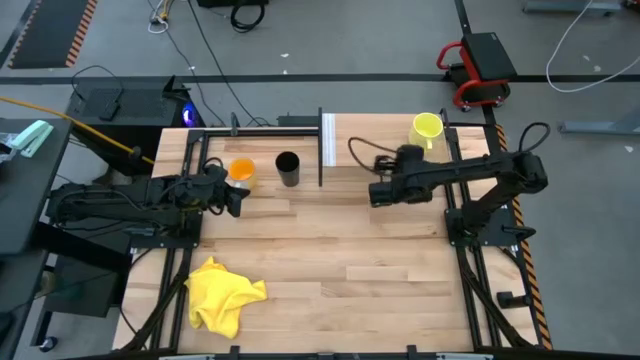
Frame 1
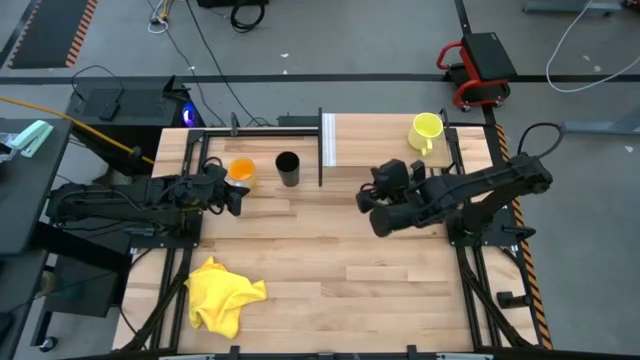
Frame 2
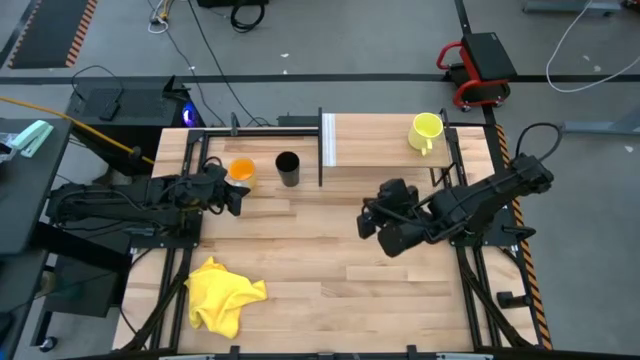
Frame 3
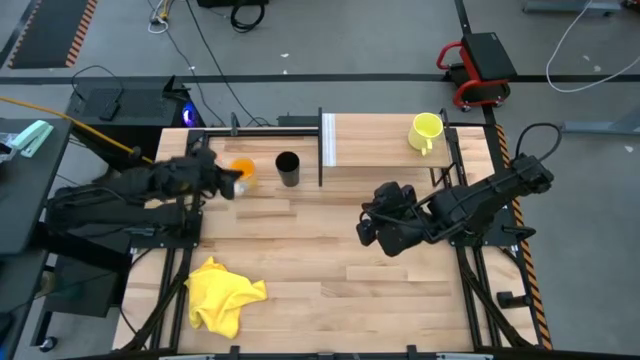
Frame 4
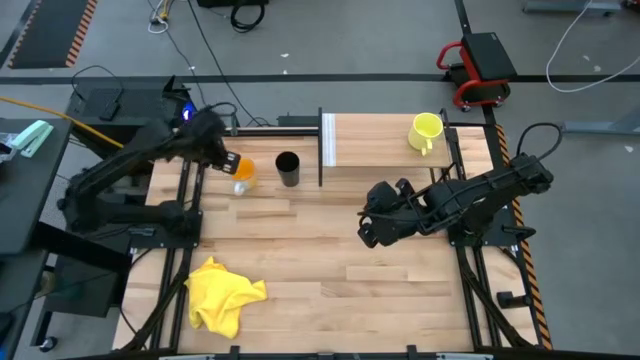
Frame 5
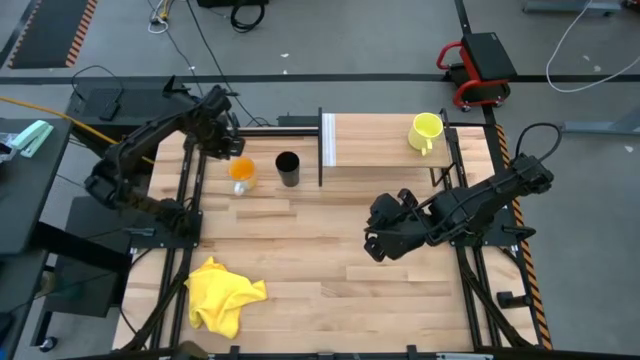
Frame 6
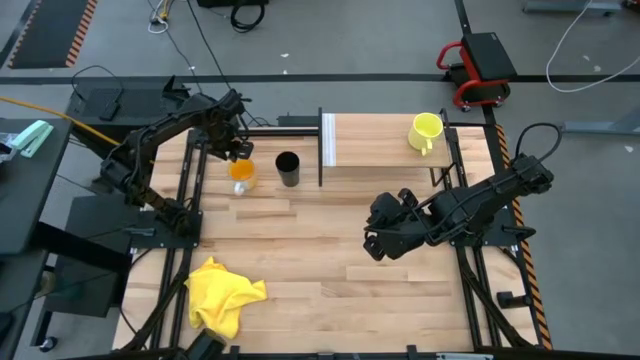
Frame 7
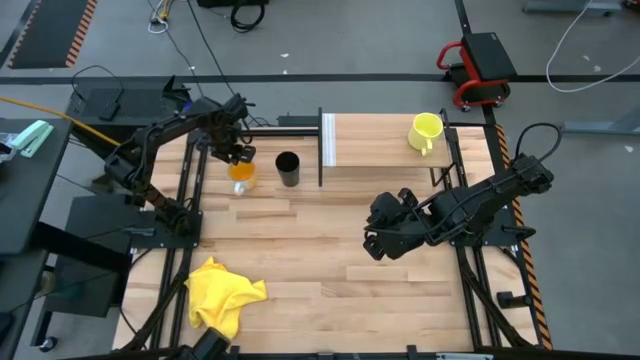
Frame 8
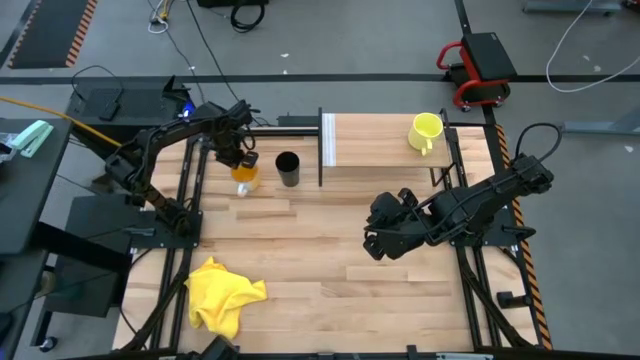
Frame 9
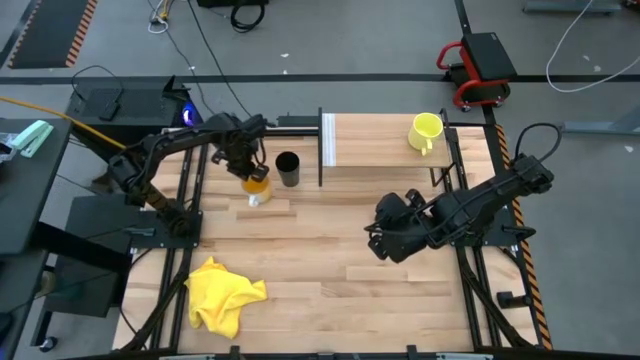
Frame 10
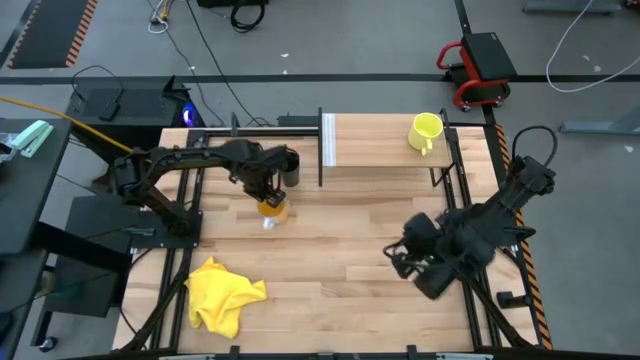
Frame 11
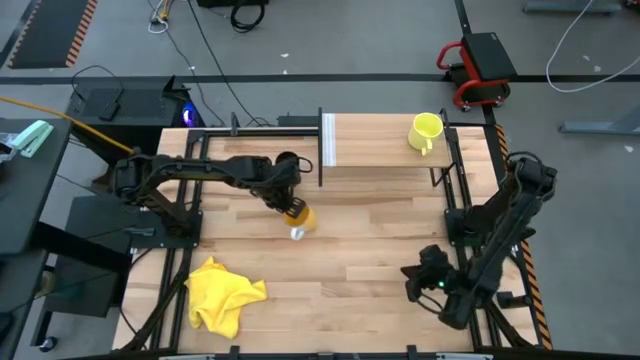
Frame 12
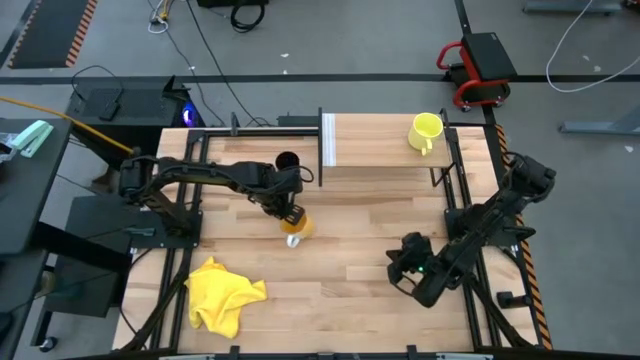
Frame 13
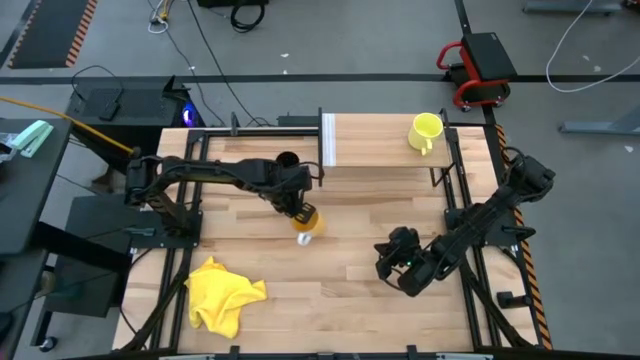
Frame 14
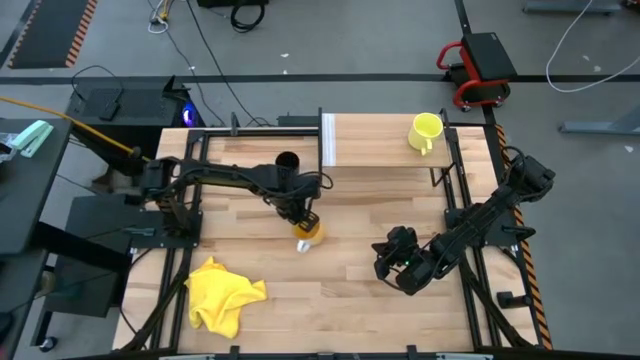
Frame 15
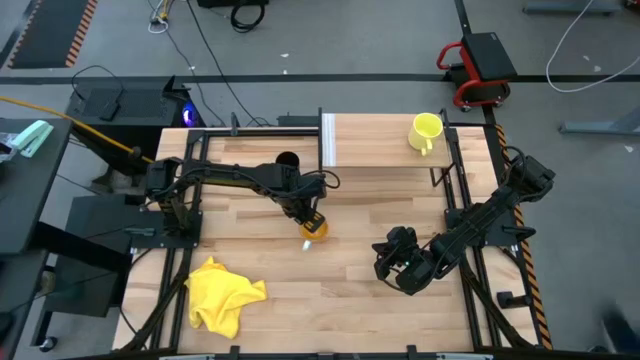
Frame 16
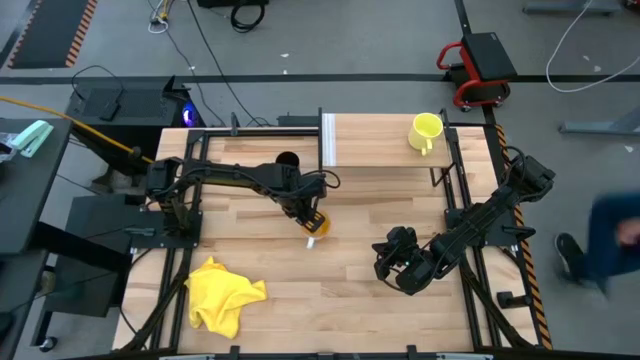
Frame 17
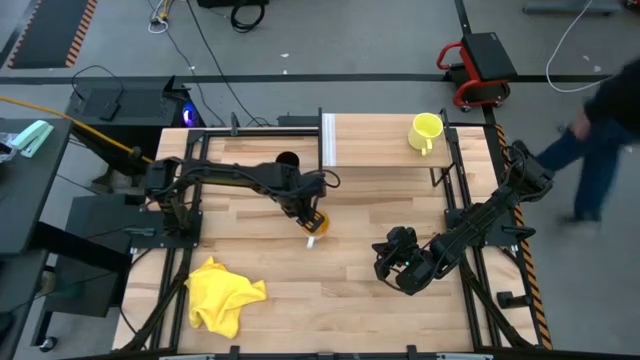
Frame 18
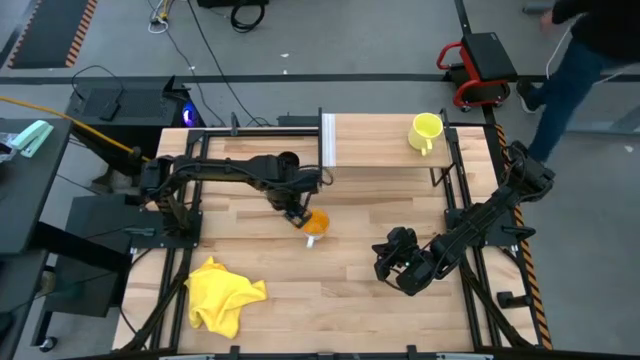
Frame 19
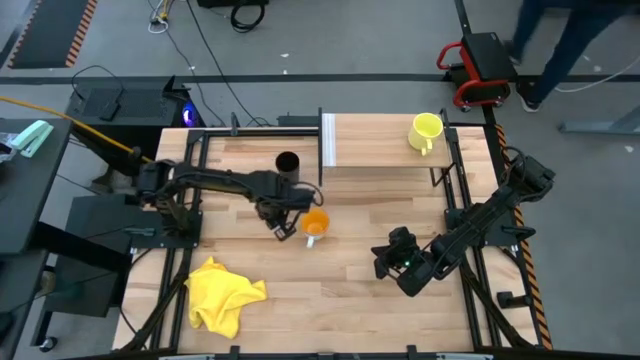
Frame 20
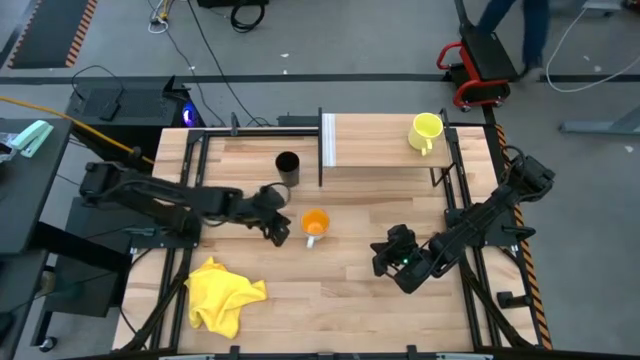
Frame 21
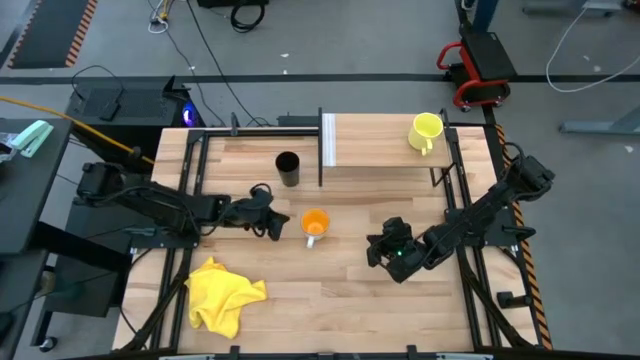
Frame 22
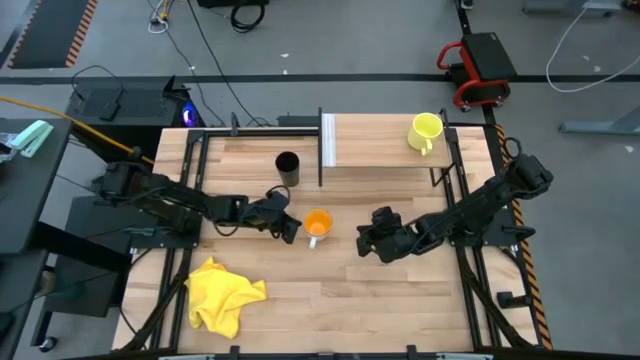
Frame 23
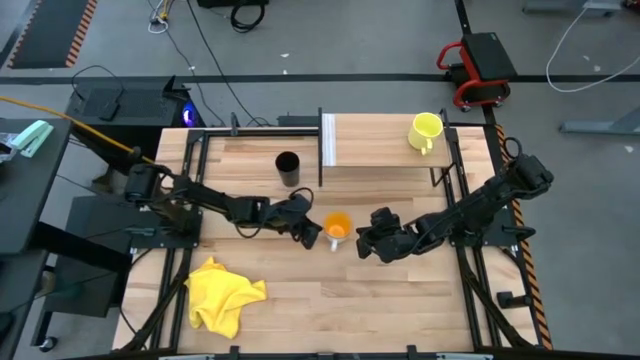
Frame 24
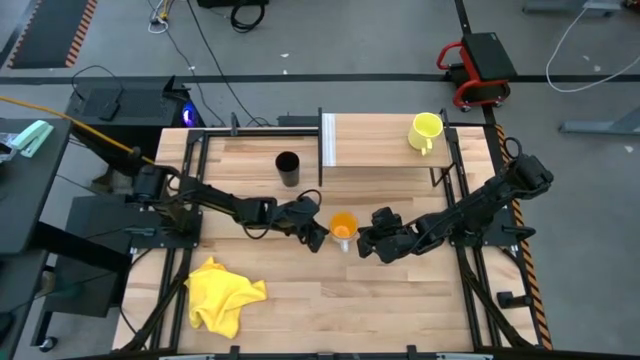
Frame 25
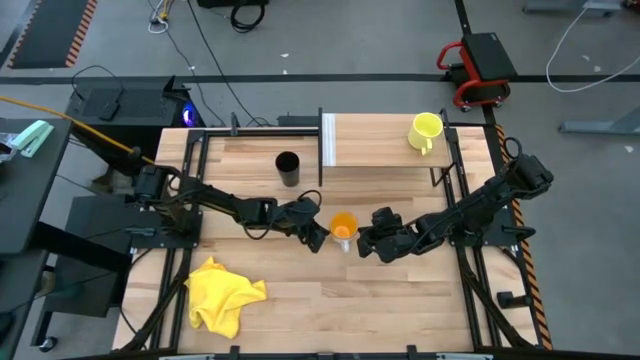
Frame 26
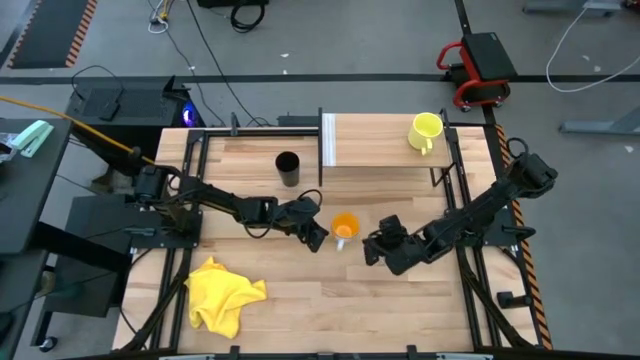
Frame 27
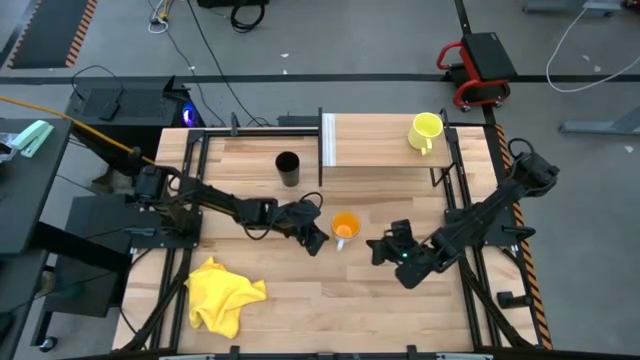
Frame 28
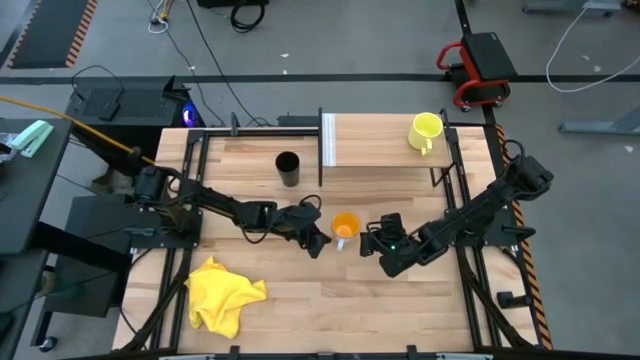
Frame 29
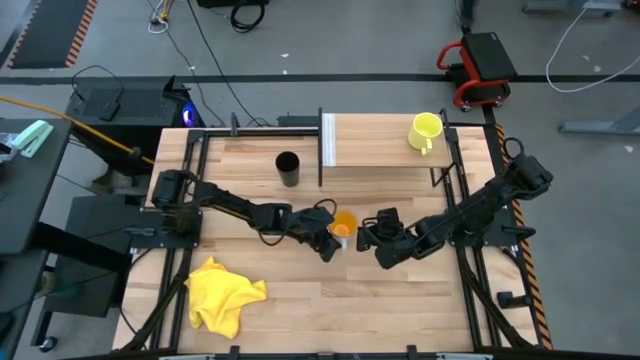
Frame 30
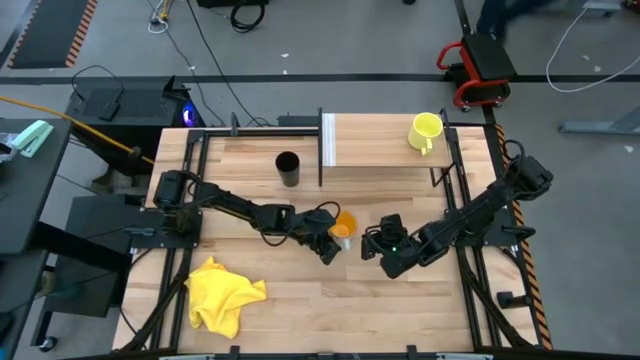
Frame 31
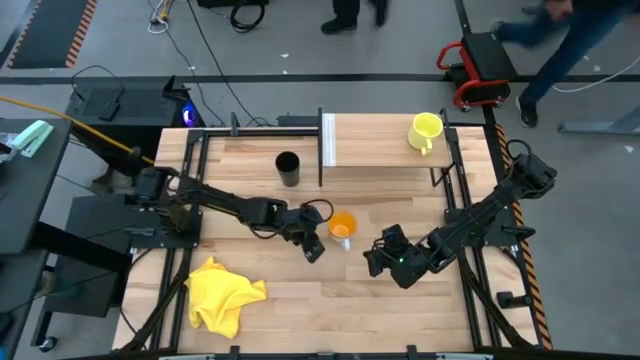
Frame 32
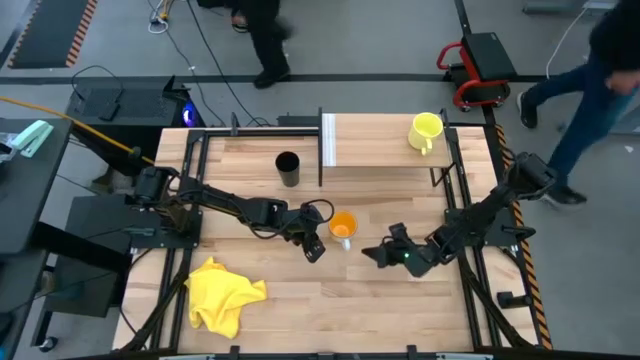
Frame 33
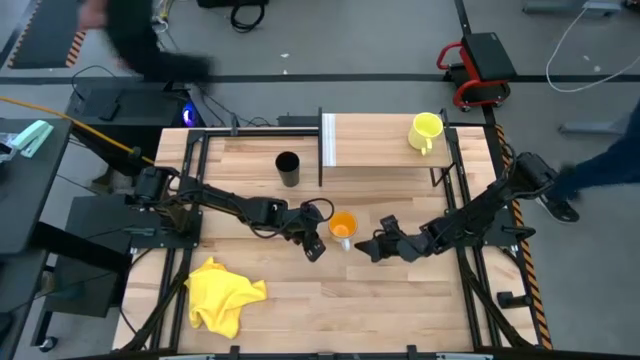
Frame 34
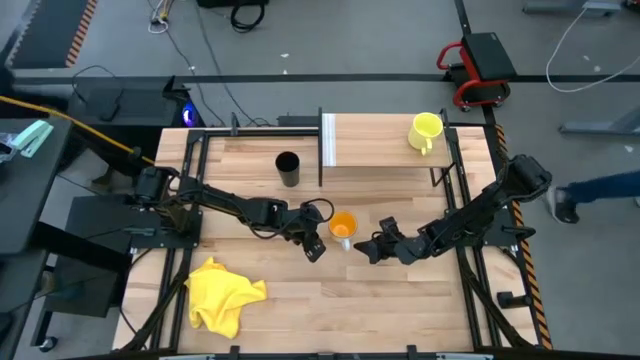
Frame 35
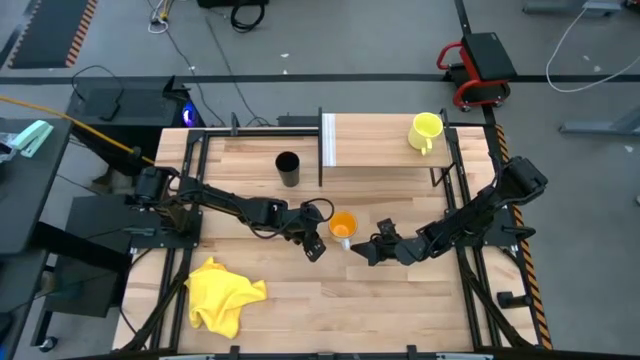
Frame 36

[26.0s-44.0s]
Task: Stack small to large cups/mugs on shelf
Put the orange mug on the shelf

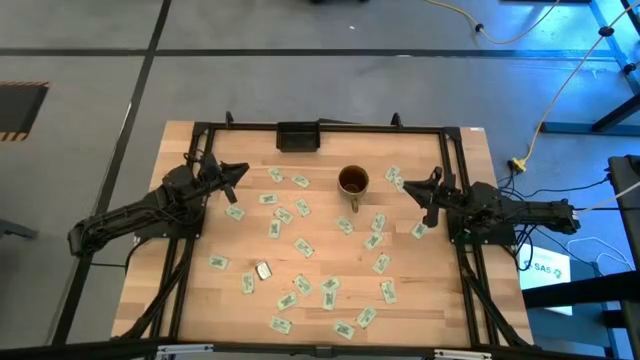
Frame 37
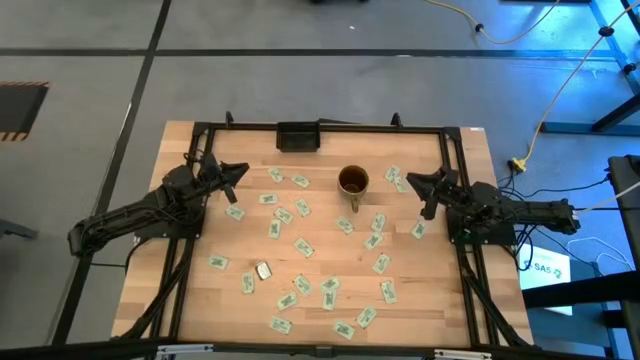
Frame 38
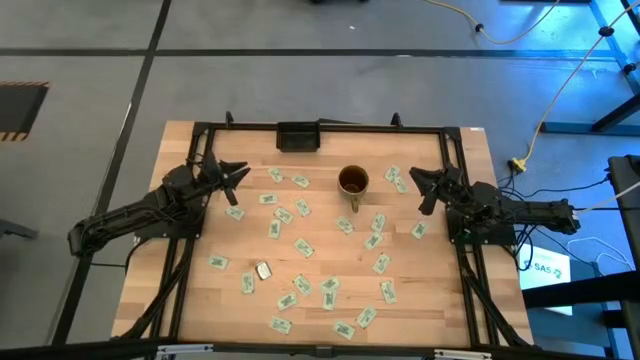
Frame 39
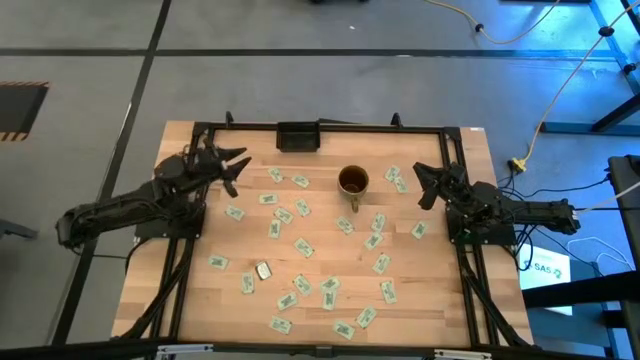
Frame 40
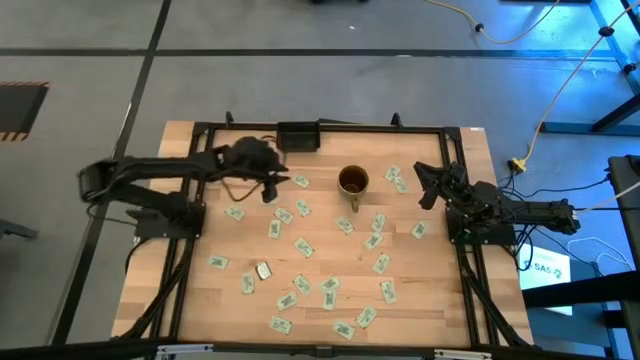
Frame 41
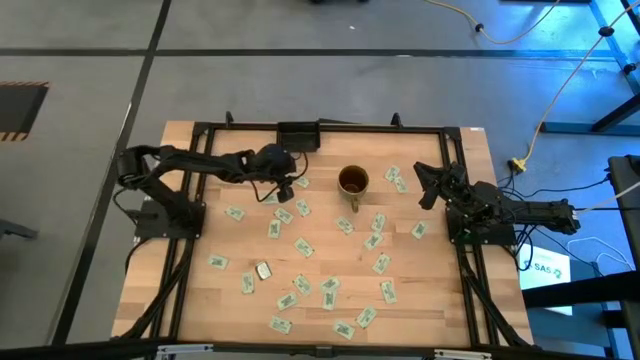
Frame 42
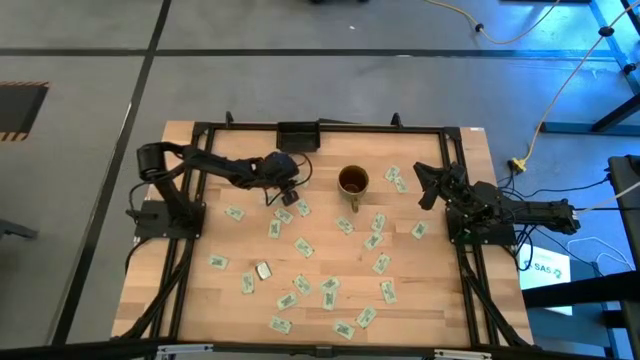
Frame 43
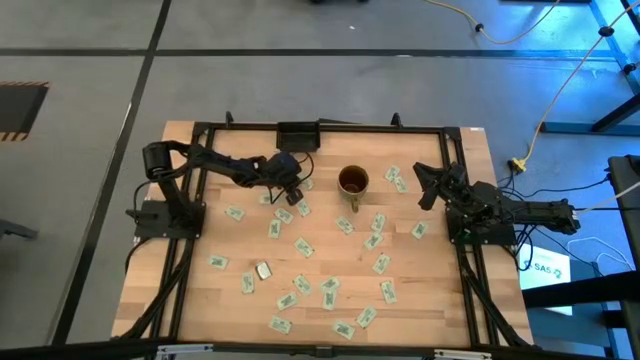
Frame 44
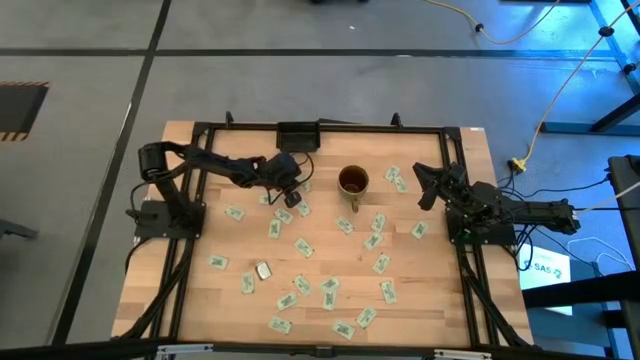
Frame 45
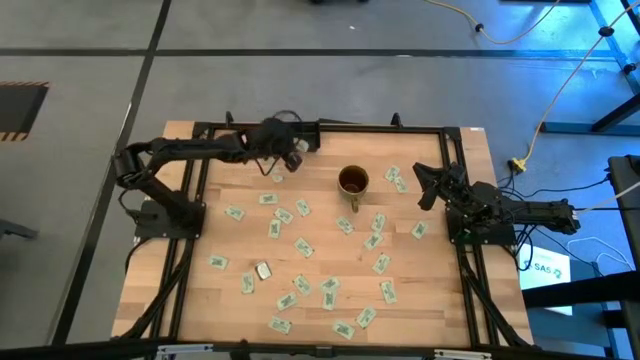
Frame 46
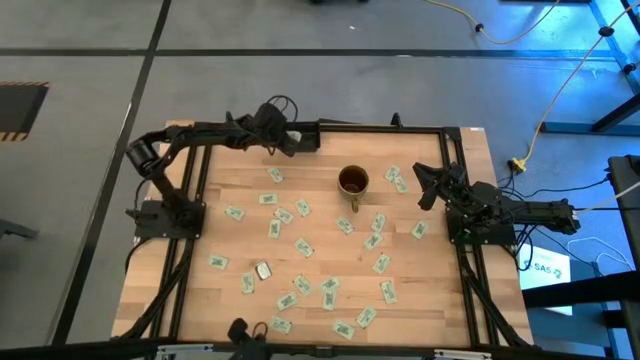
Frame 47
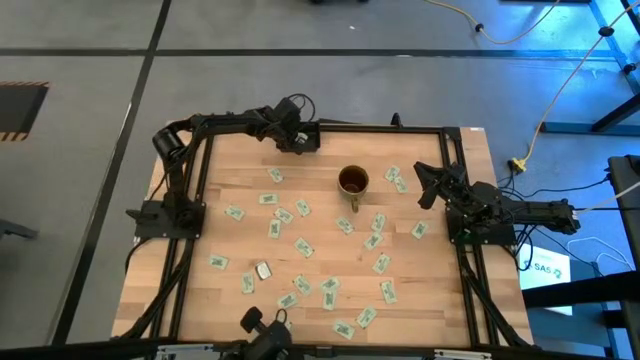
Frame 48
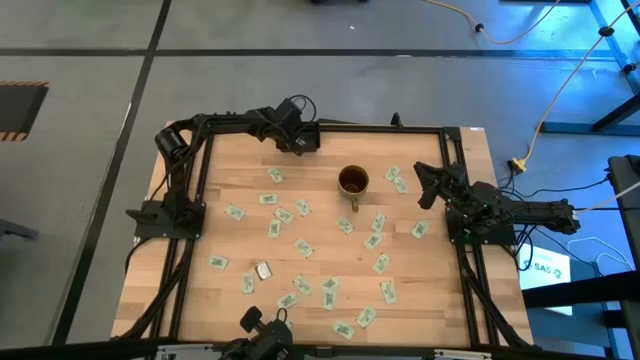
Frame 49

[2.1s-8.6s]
Task: Pick and place Stevia / Truvia into bins
Put the stevia packet into the black container
